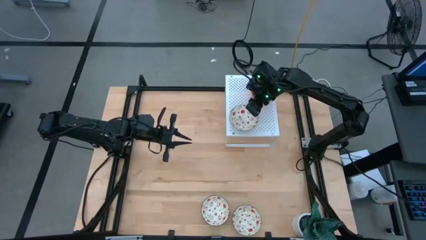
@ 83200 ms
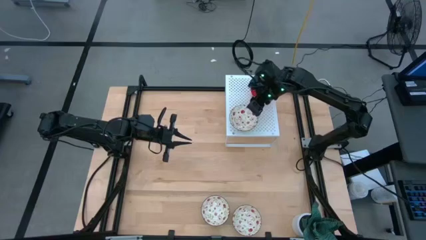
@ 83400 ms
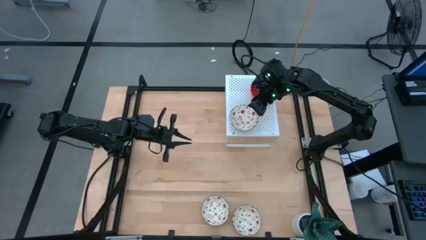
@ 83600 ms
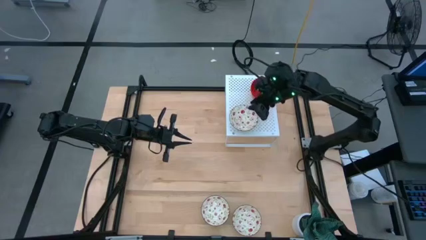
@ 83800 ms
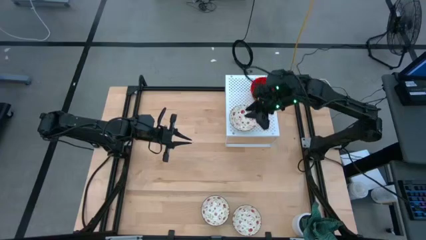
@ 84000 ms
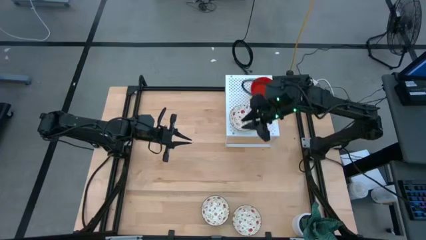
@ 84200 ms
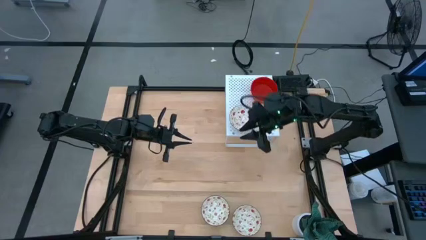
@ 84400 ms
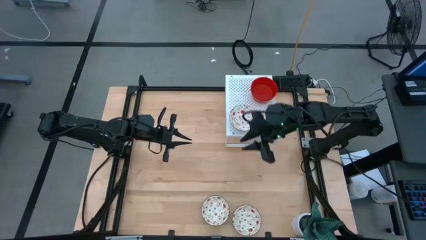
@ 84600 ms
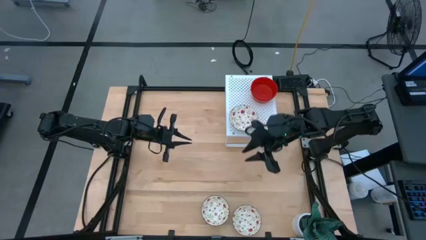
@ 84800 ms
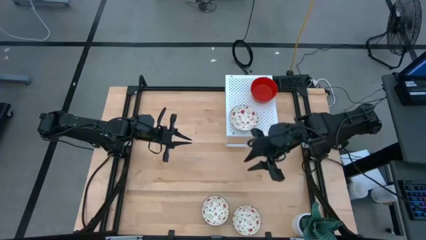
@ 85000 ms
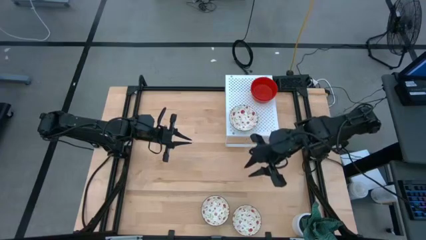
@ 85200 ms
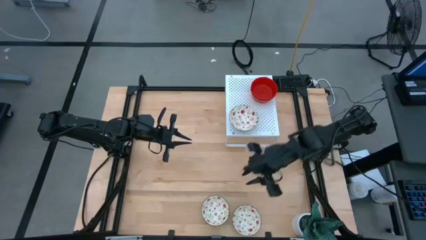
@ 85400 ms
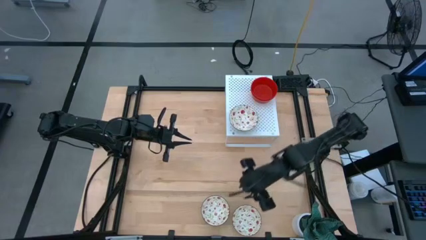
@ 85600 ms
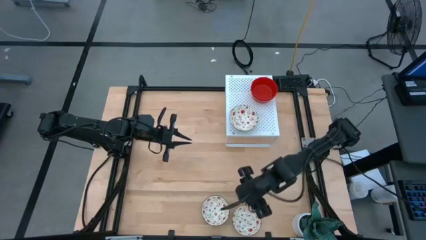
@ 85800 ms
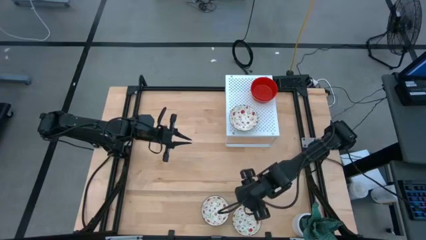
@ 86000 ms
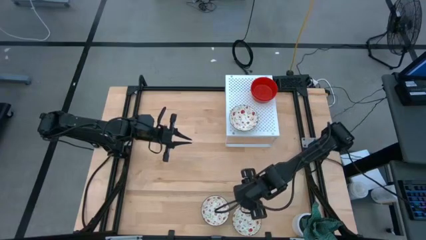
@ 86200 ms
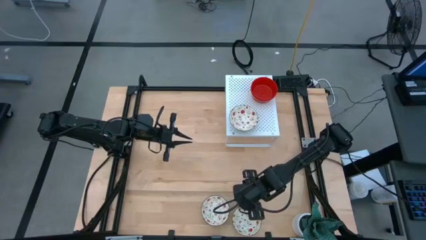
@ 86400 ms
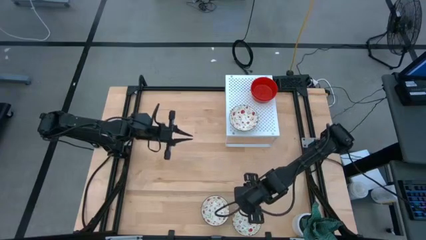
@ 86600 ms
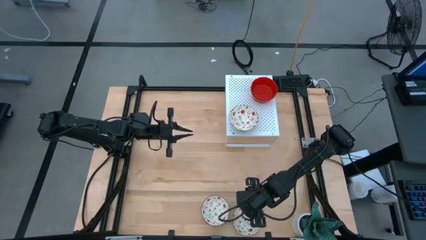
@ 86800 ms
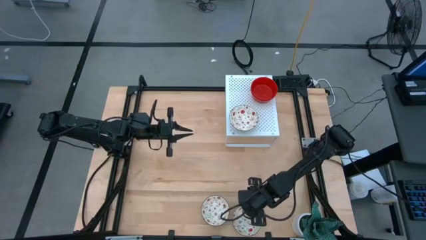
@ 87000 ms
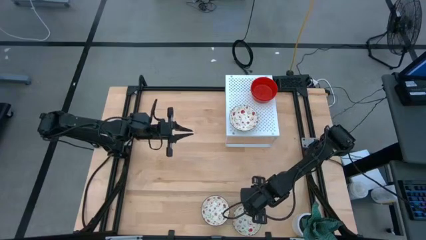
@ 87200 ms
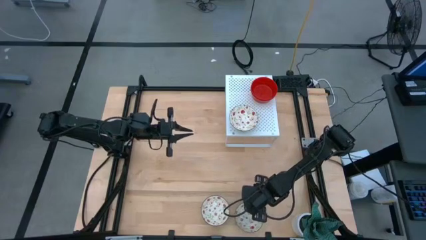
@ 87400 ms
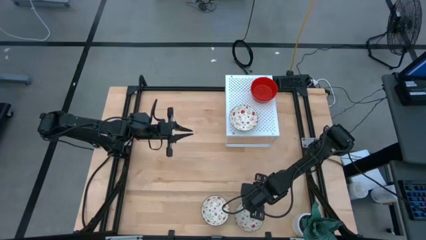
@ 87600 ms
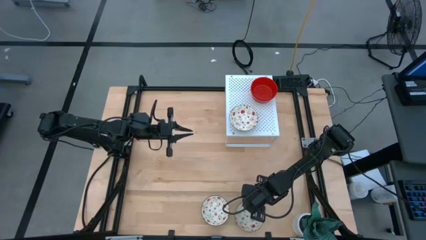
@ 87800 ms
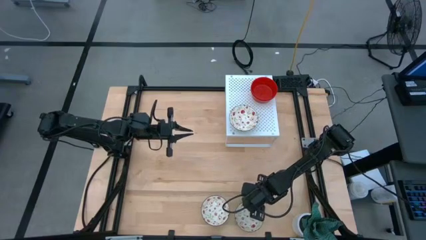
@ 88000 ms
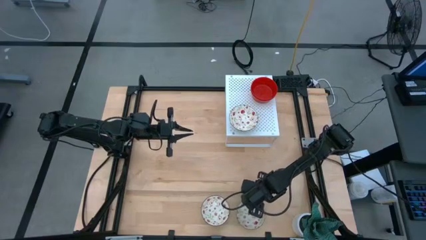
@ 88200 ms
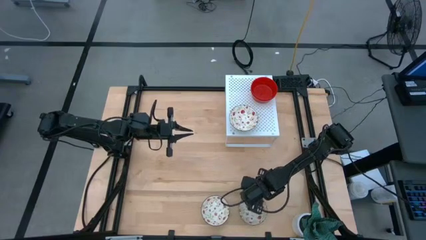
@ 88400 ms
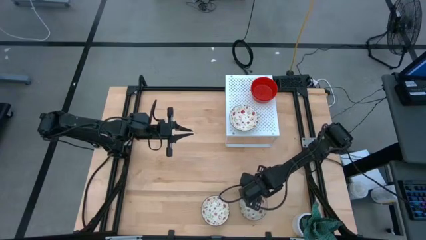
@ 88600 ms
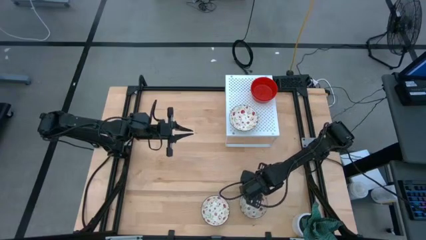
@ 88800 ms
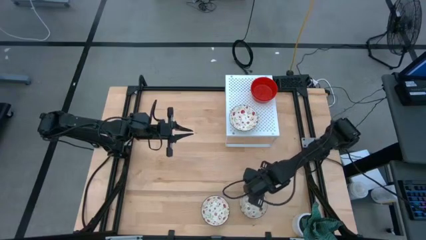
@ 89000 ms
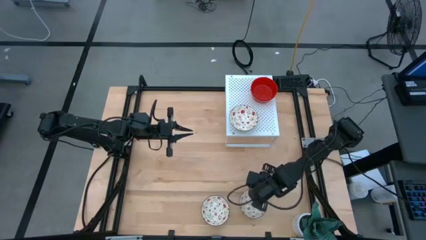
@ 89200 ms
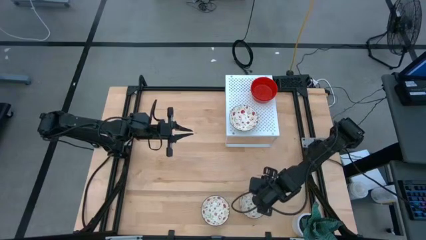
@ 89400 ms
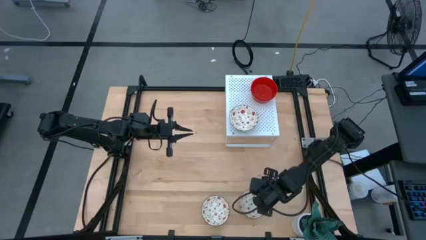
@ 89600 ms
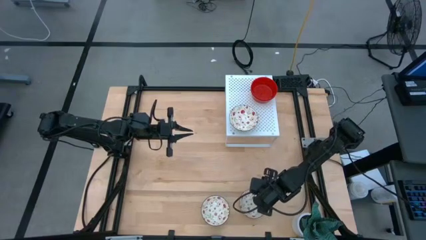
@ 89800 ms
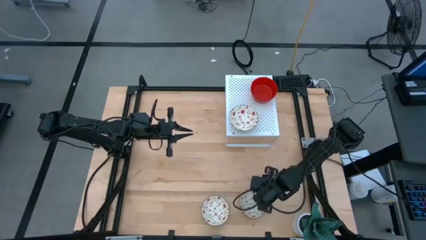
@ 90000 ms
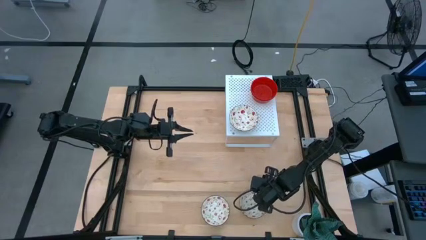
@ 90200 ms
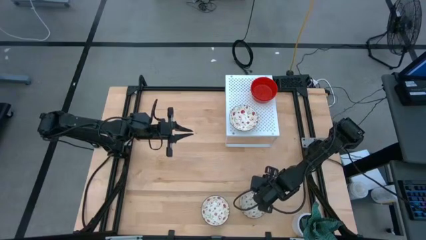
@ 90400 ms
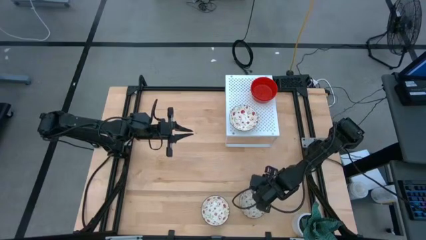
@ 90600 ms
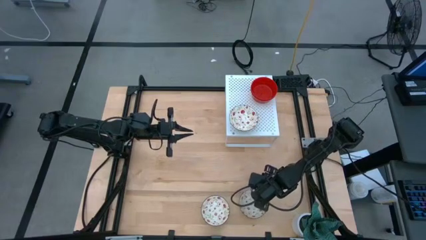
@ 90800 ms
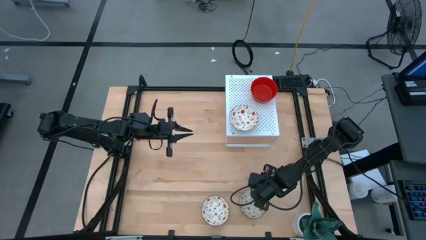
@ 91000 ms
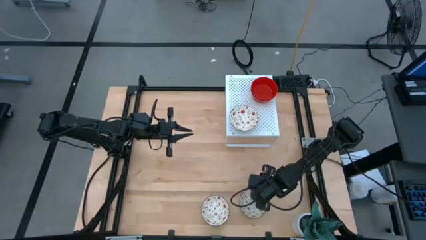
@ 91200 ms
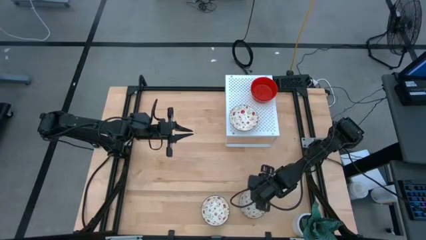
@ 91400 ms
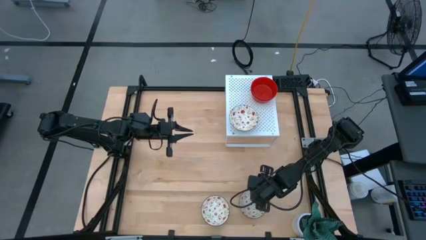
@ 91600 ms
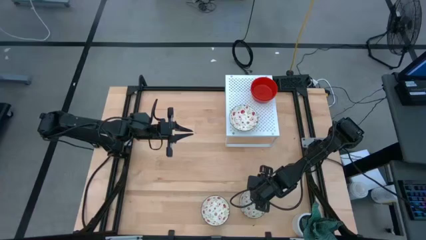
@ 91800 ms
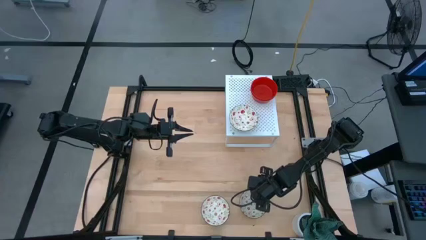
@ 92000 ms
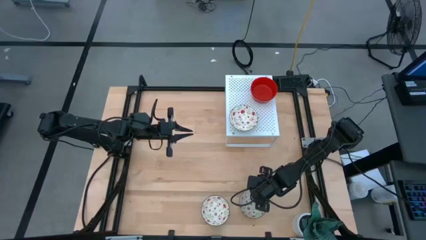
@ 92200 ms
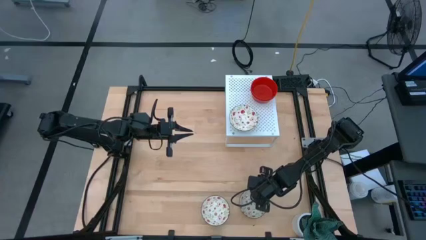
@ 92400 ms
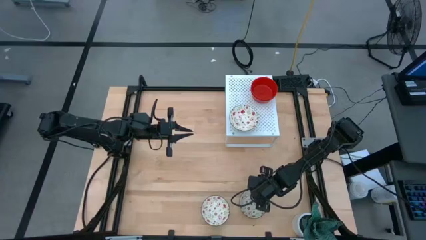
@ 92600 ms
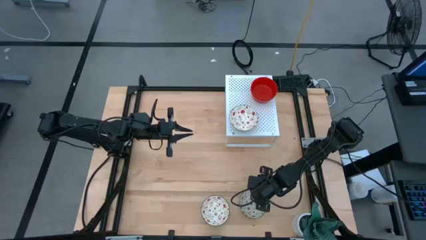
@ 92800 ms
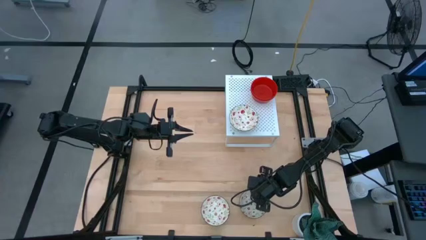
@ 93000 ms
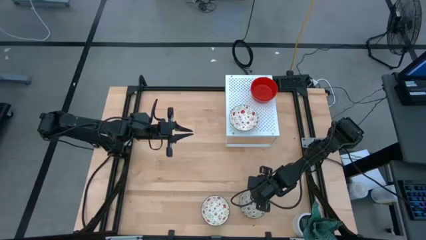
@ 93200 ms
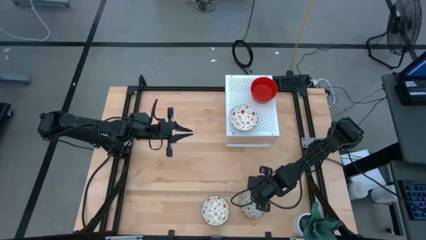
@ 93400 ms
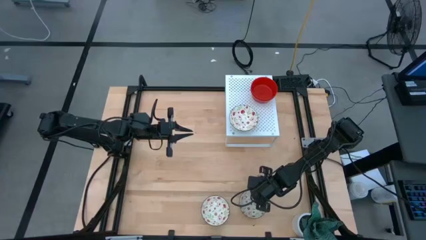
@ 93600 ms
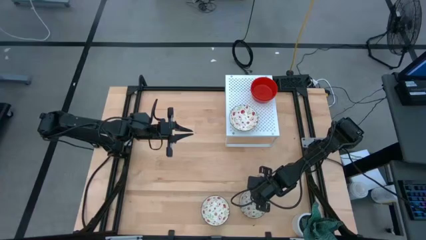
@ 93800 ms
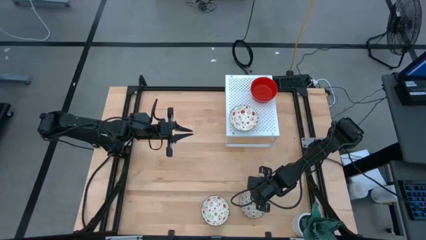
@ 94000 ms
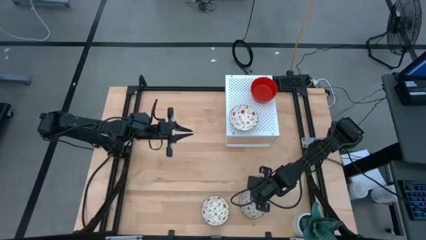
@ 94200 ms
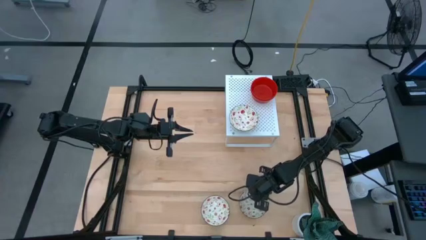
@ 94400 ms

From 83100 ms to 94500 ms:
Task: Pick & Place Mini bowls
Stack the right green bowl on the green bowl on the shelf
